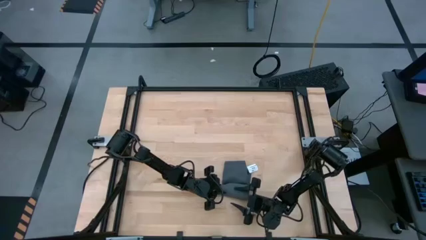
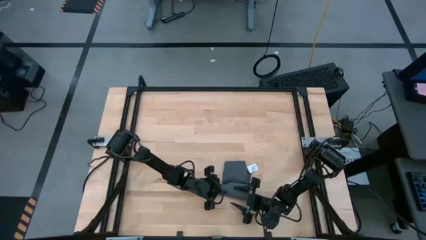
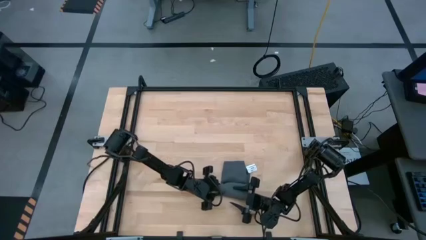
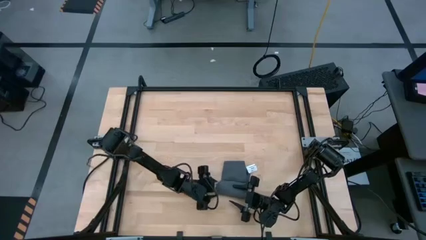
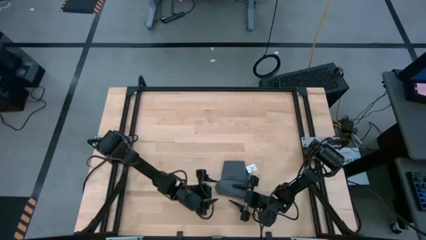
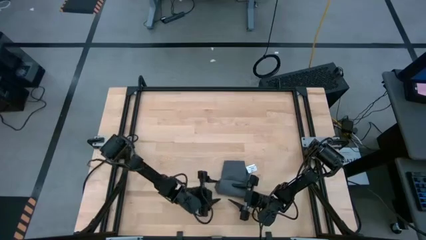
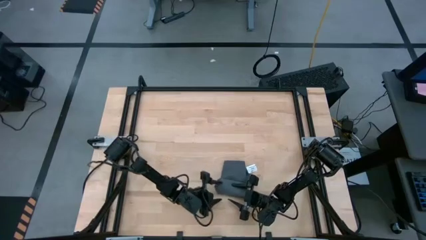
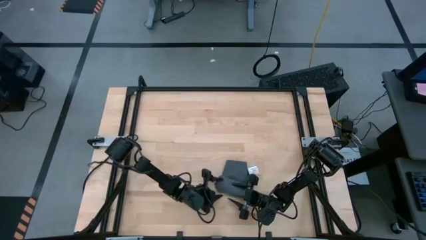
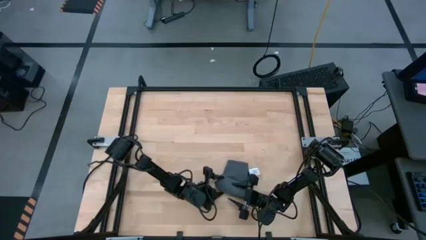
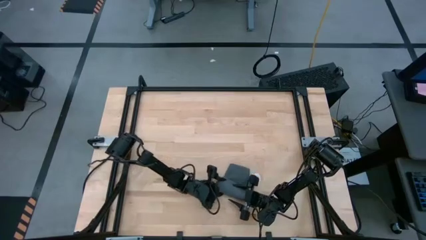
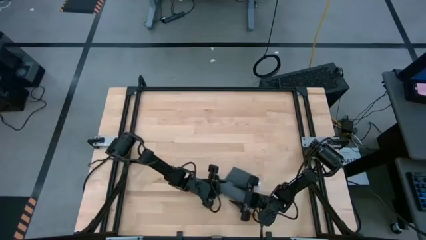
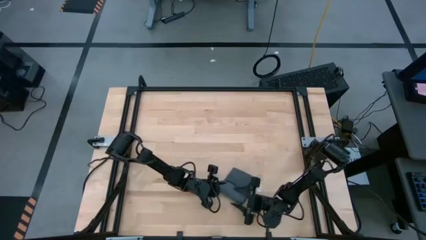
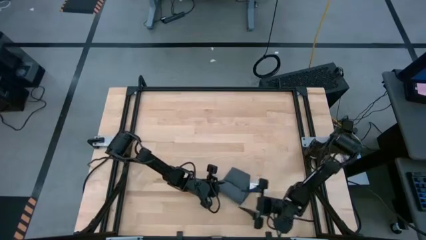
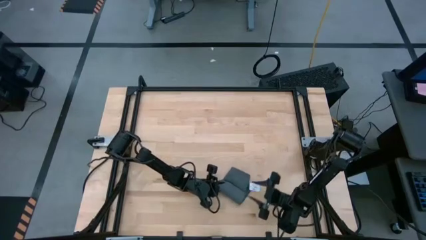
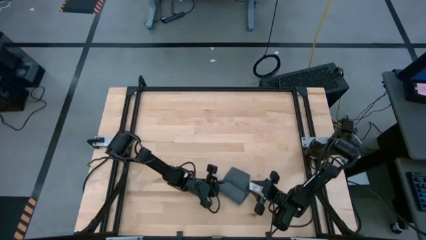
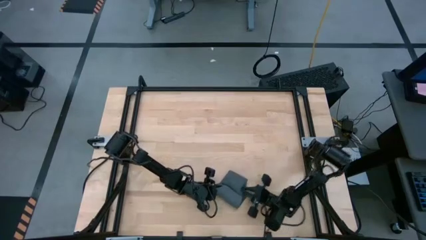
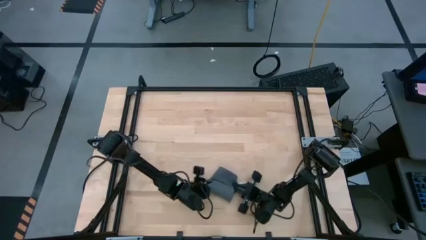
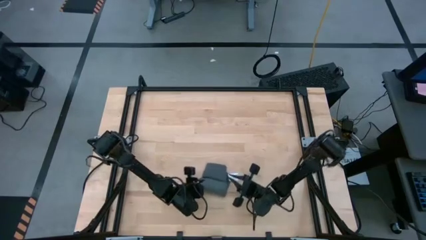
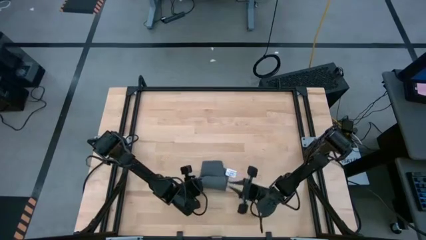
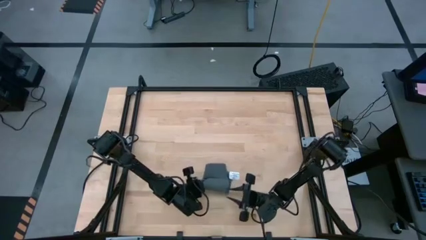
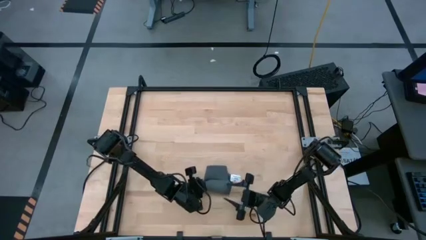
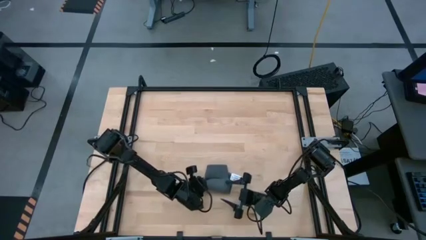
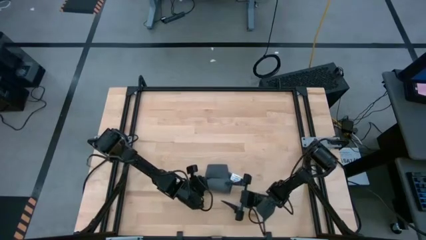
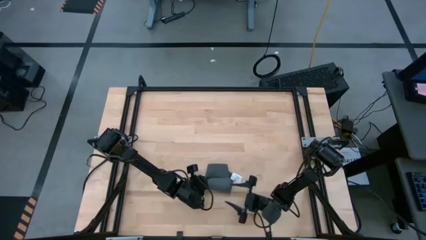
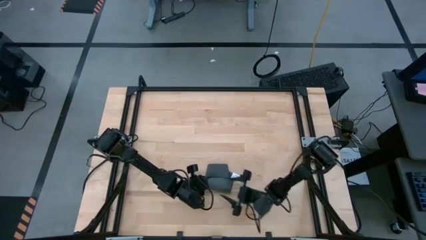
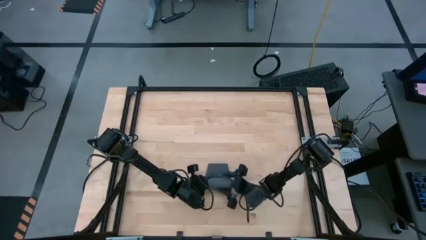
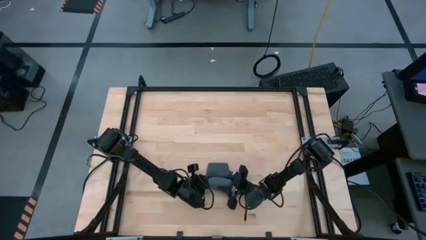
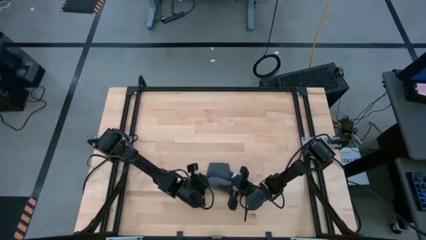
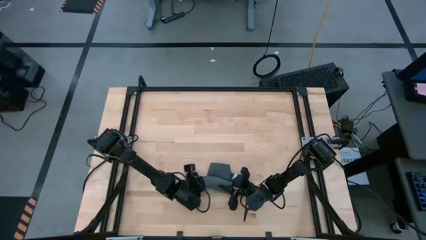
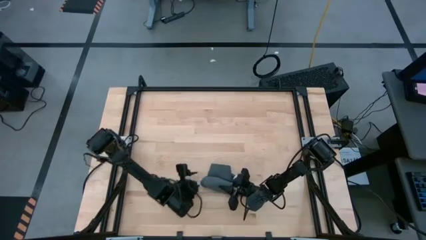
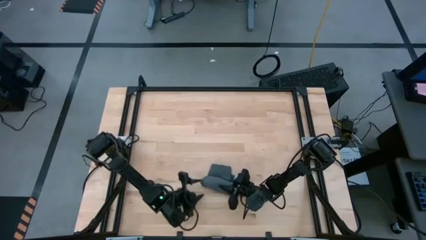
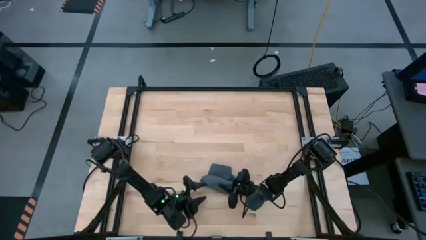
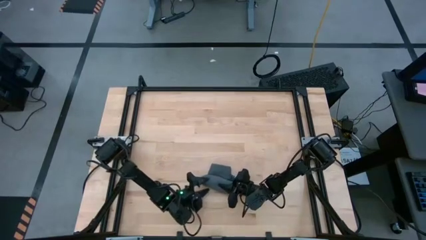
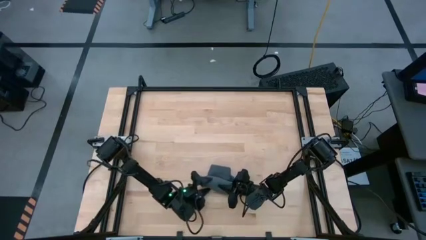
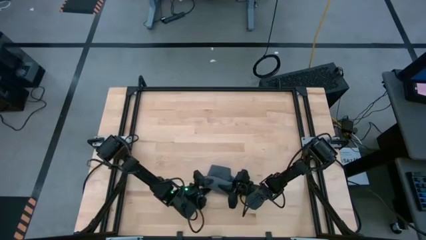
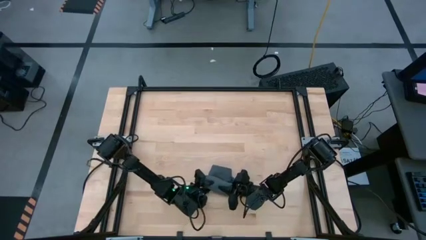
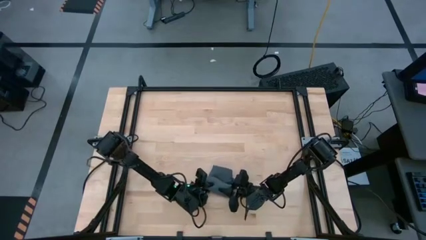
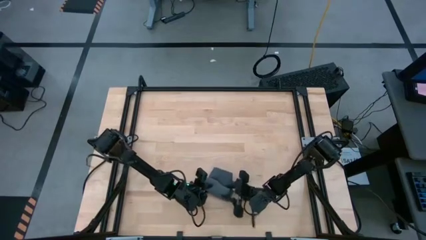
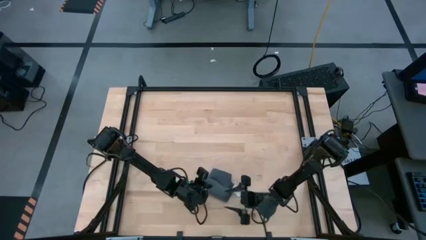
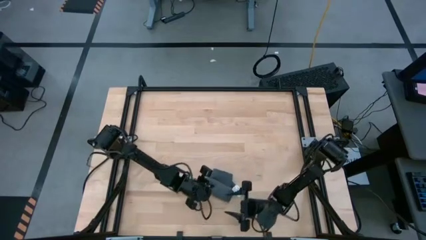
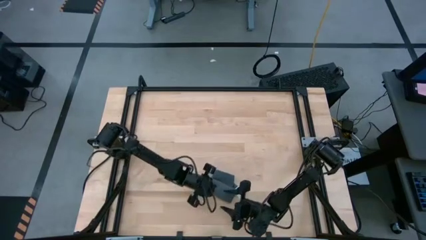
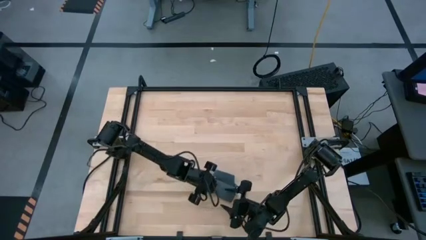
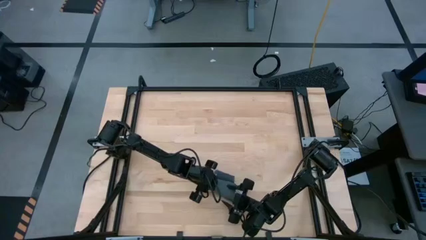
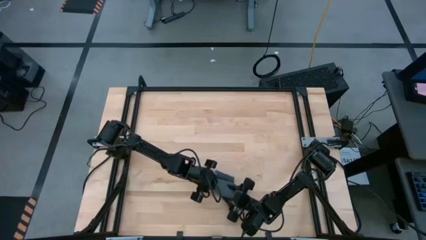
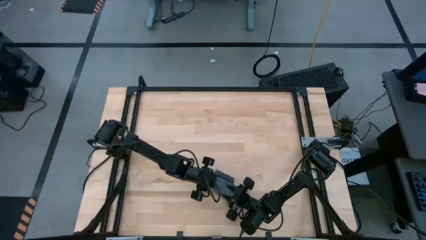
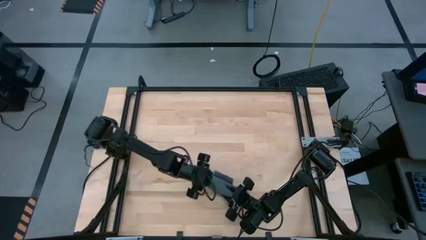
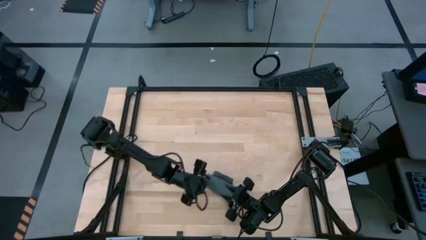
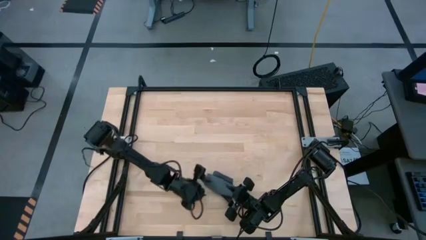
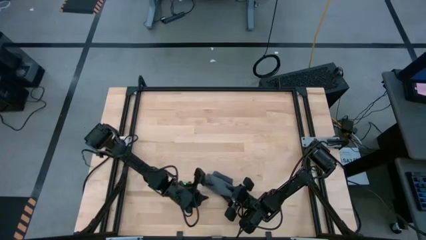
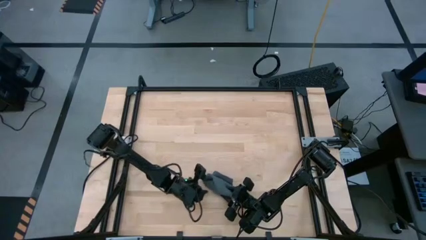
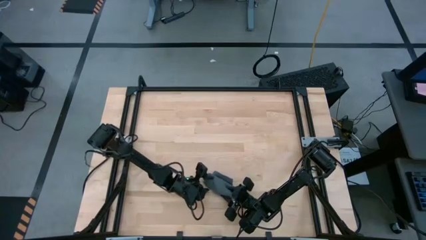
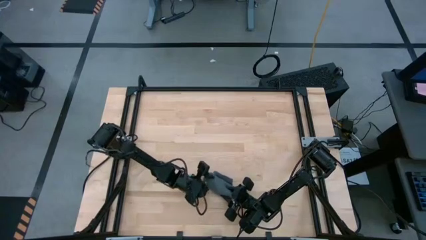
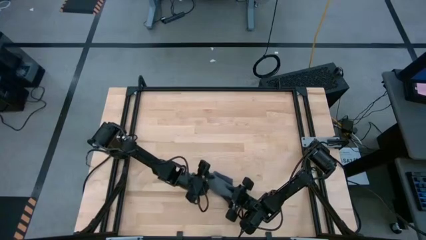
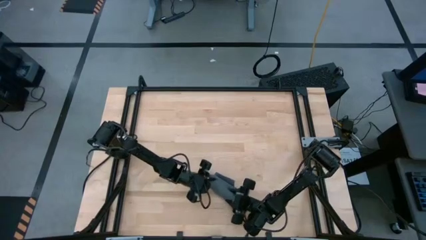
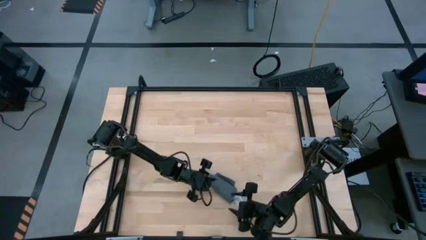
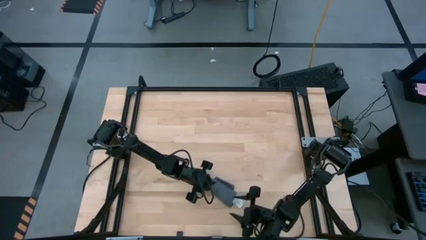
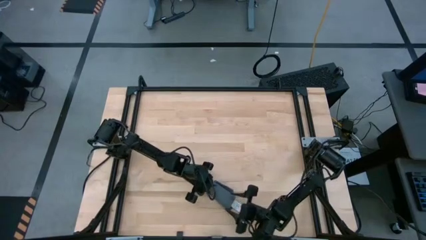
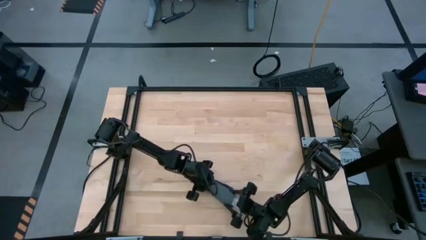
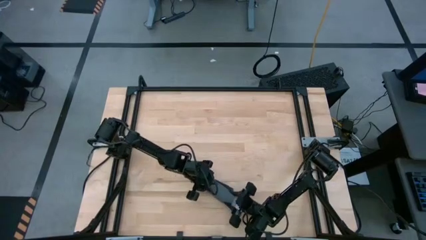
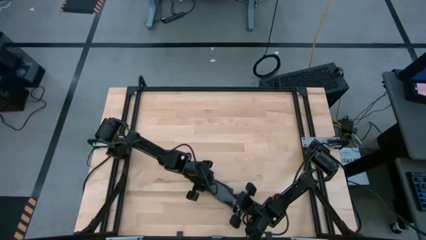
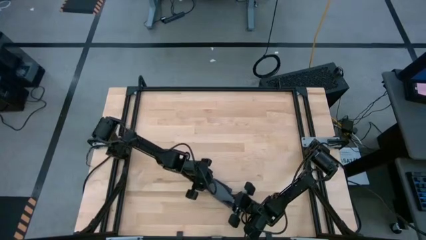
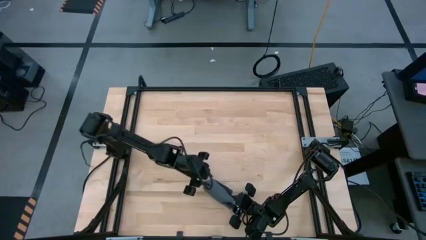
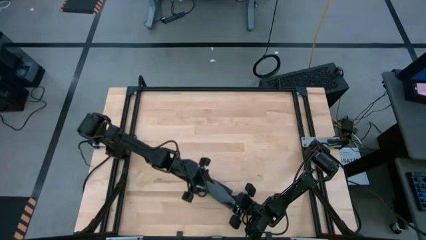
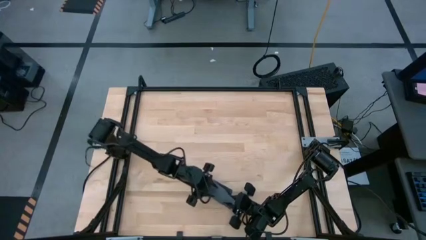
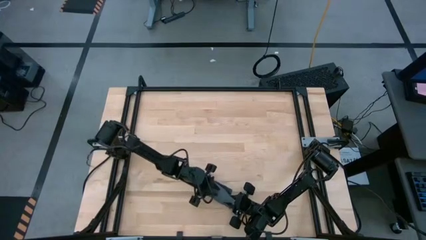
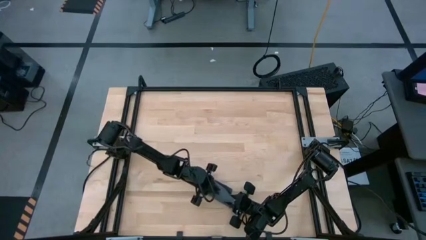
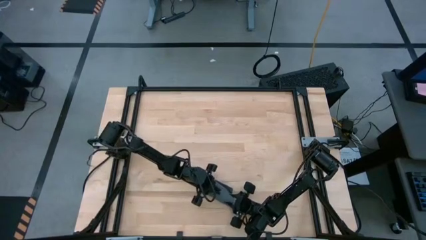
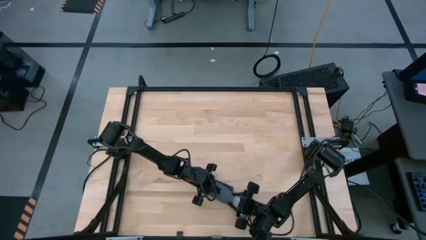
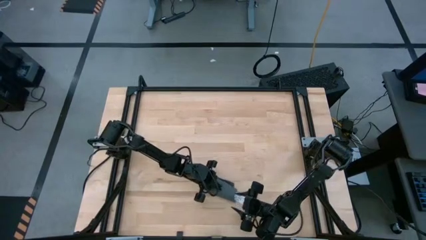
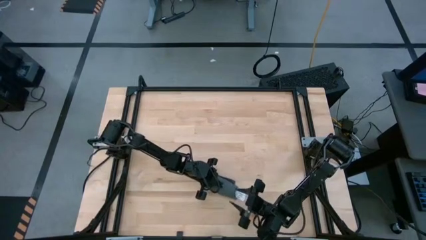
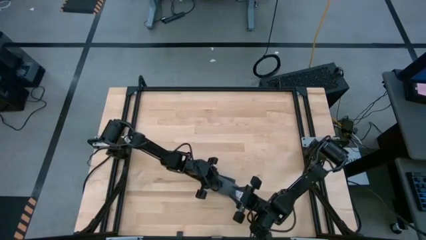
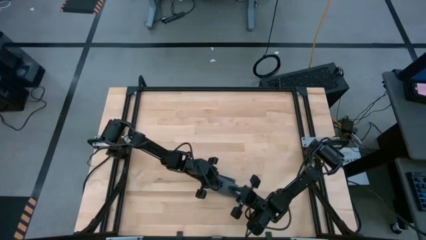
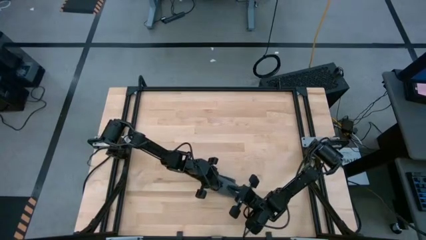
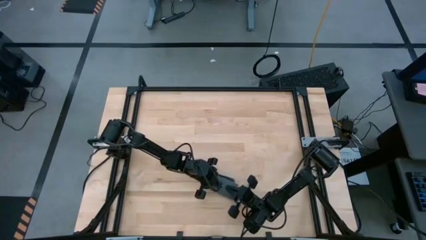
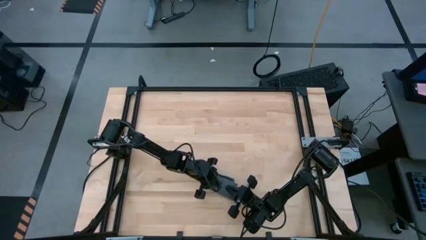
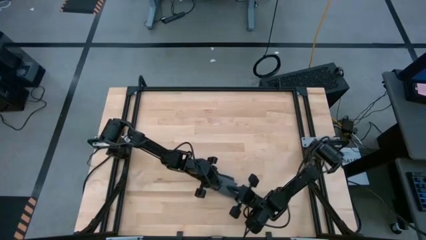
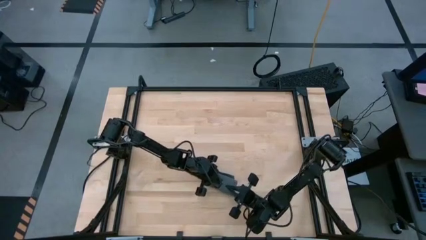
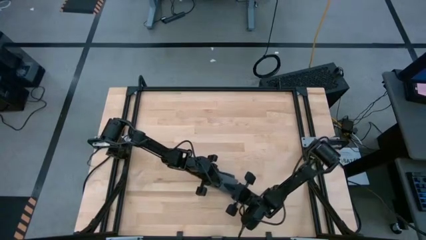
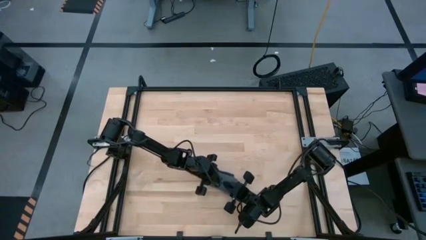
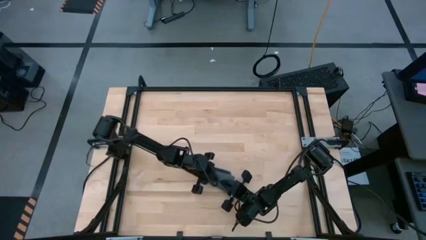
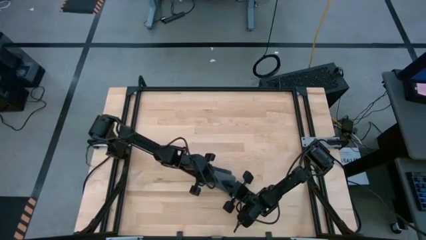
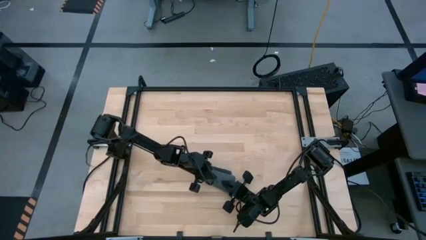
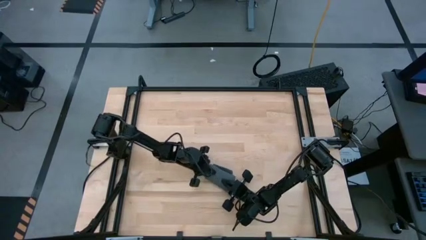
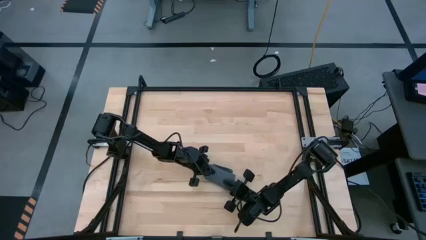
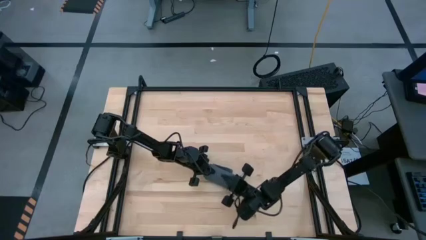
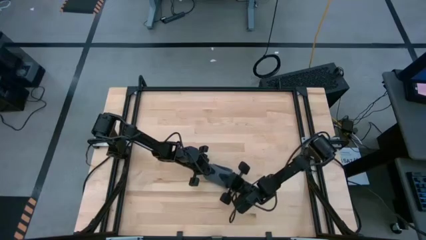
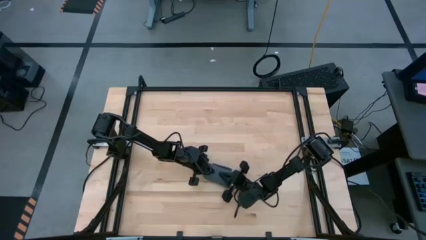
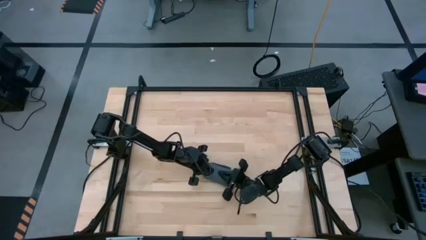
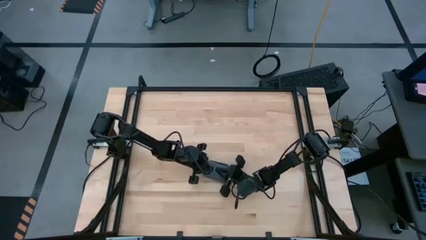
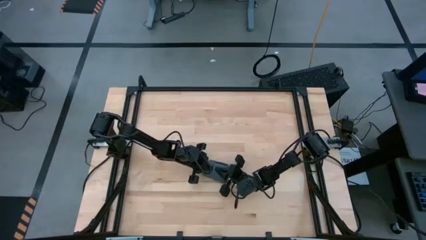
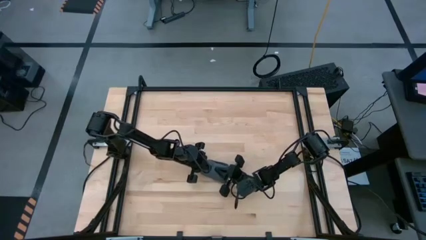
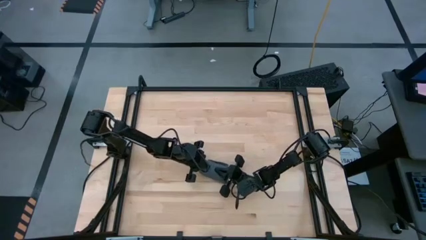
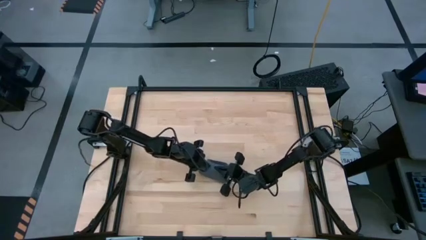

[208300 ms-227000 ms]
Task: Roll towel into tight, uniform cylinder
Roll the towel
